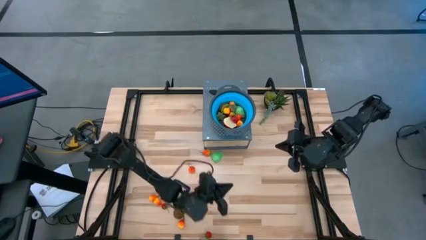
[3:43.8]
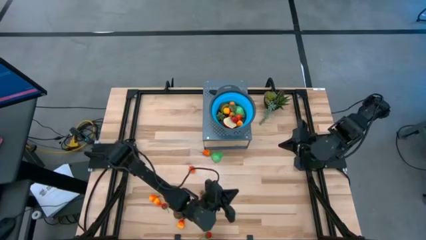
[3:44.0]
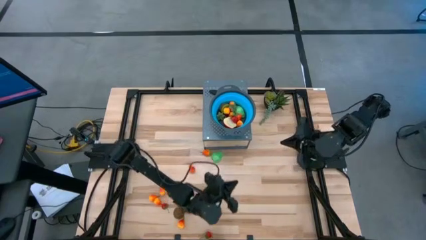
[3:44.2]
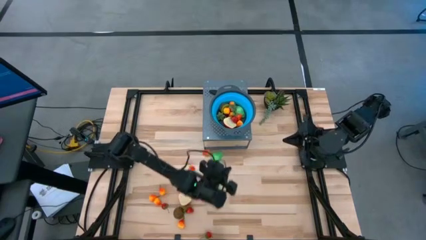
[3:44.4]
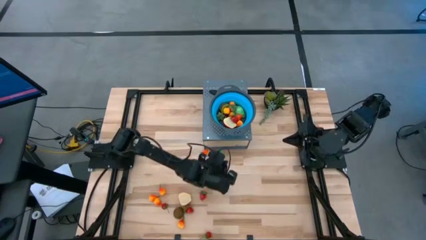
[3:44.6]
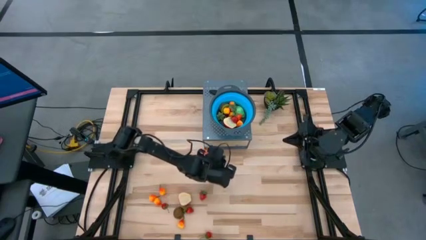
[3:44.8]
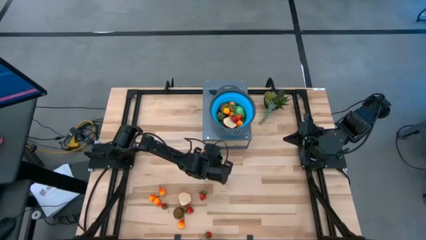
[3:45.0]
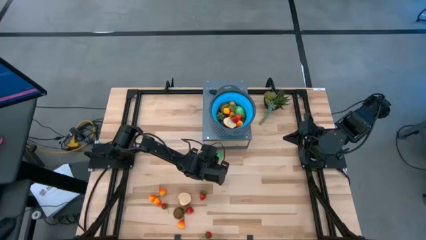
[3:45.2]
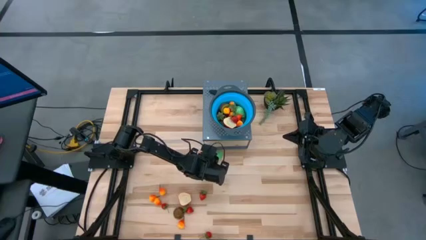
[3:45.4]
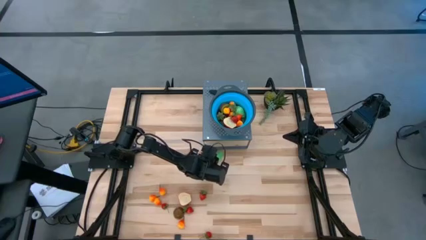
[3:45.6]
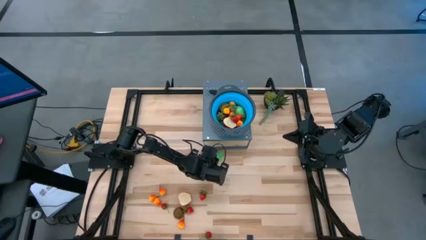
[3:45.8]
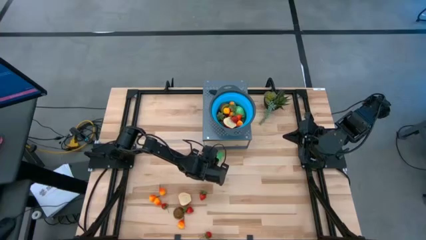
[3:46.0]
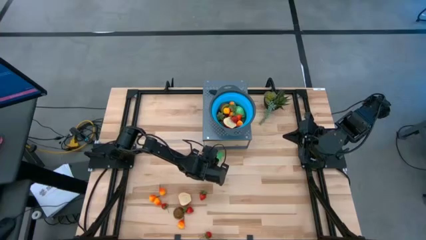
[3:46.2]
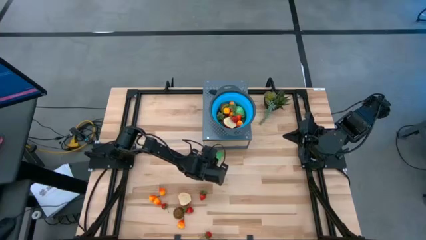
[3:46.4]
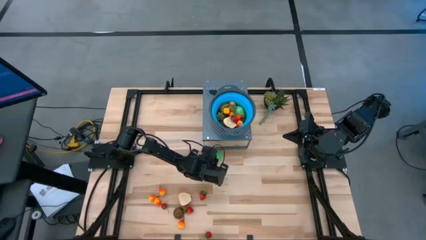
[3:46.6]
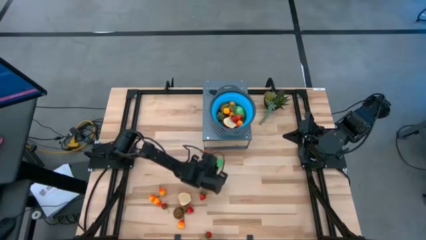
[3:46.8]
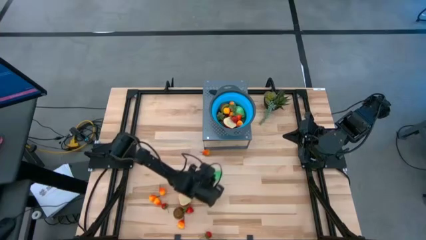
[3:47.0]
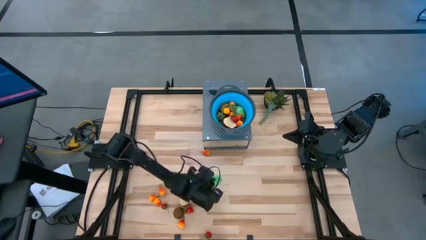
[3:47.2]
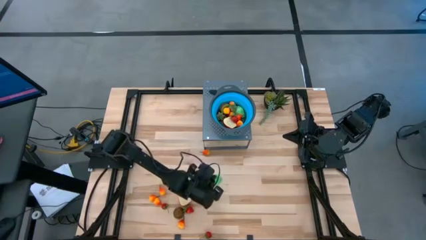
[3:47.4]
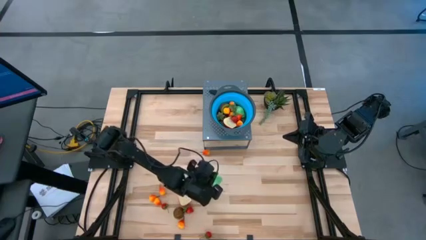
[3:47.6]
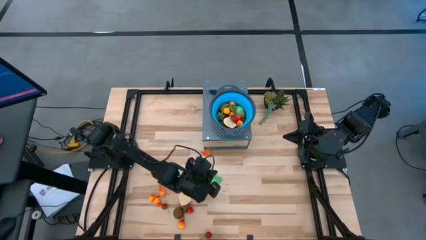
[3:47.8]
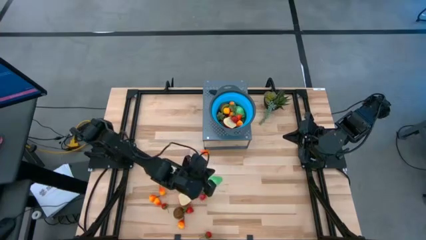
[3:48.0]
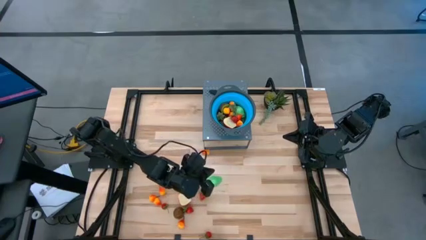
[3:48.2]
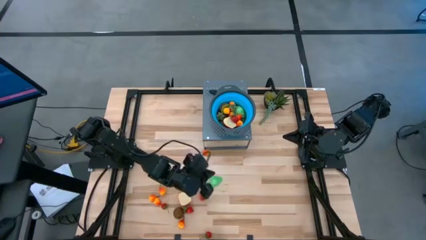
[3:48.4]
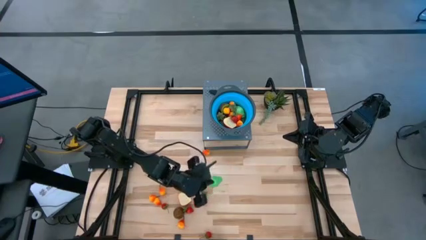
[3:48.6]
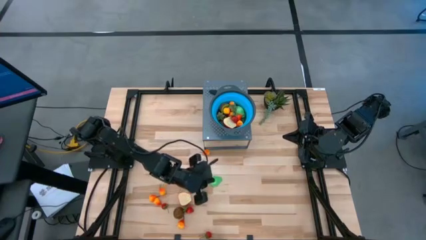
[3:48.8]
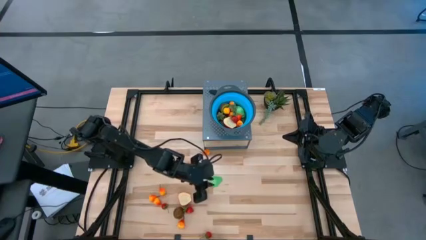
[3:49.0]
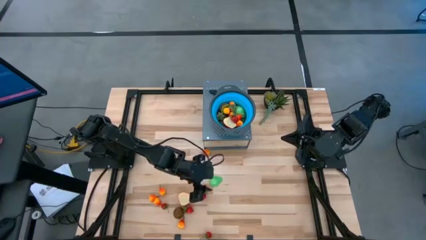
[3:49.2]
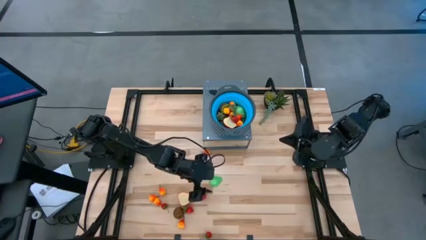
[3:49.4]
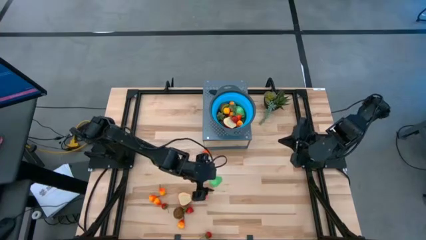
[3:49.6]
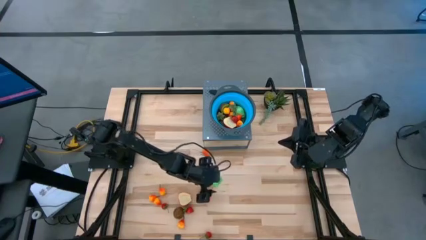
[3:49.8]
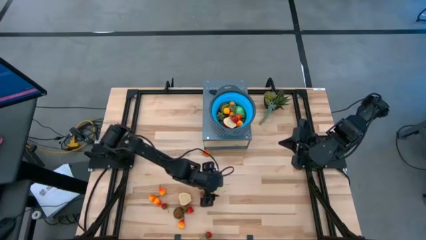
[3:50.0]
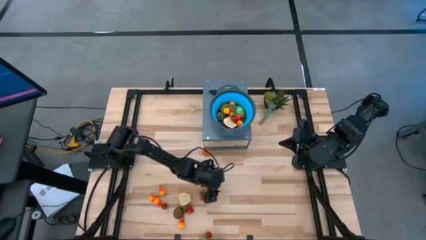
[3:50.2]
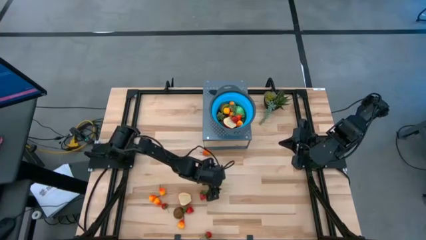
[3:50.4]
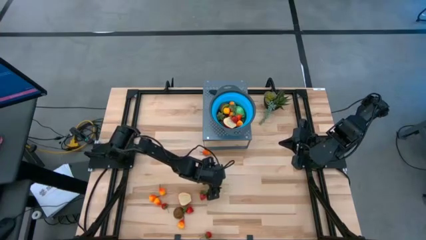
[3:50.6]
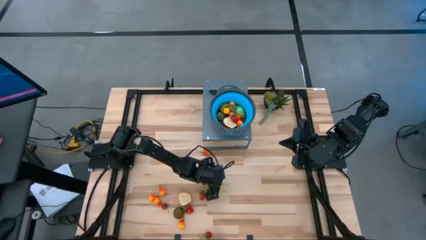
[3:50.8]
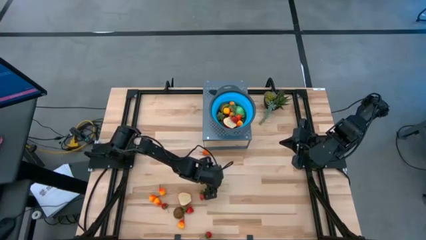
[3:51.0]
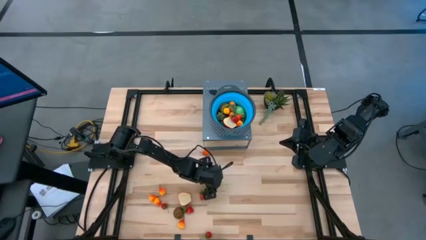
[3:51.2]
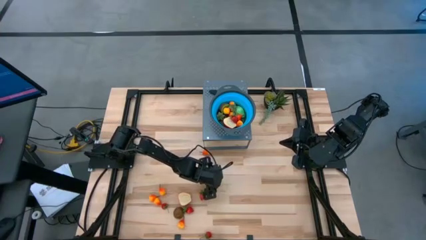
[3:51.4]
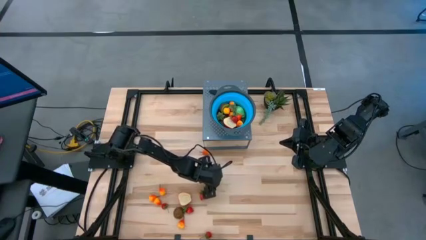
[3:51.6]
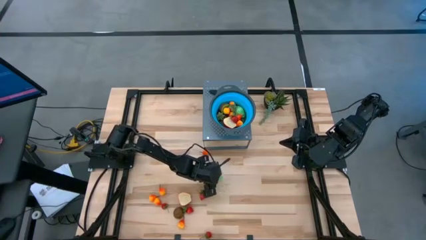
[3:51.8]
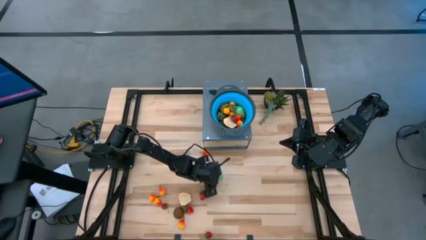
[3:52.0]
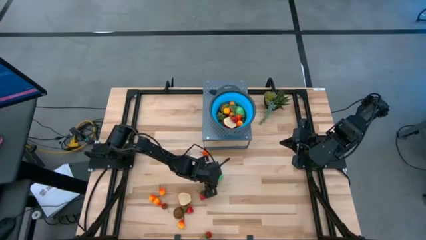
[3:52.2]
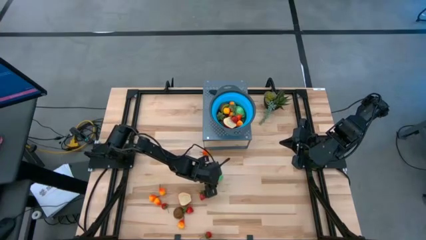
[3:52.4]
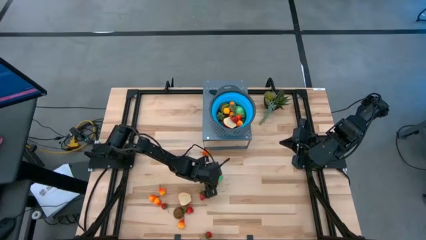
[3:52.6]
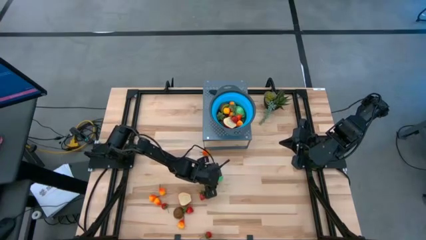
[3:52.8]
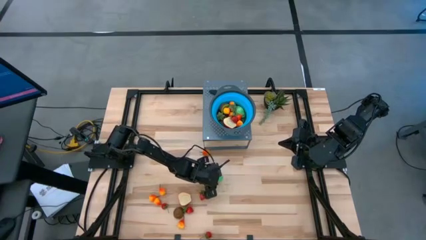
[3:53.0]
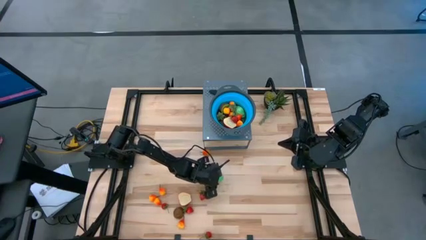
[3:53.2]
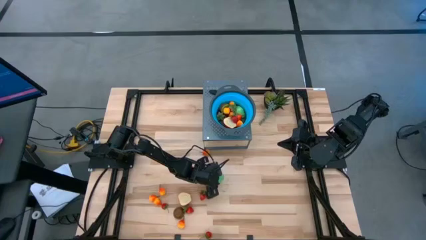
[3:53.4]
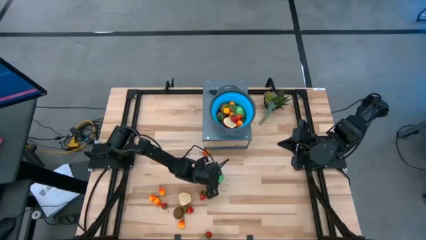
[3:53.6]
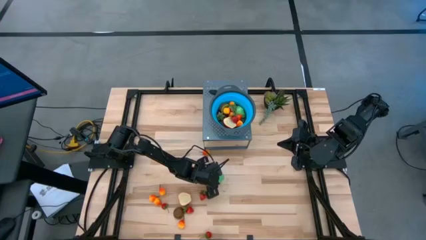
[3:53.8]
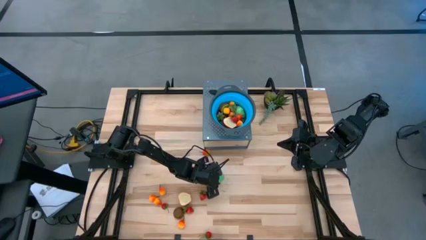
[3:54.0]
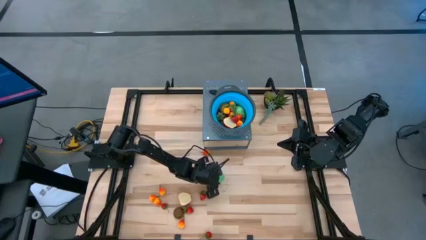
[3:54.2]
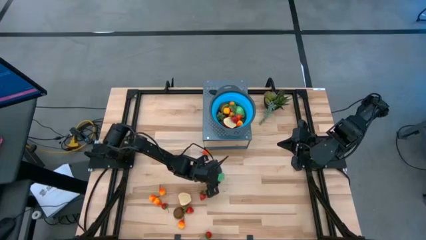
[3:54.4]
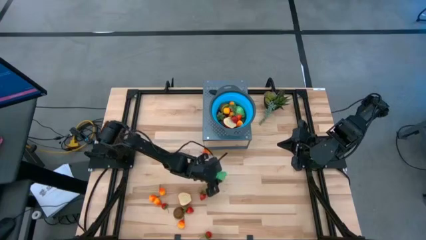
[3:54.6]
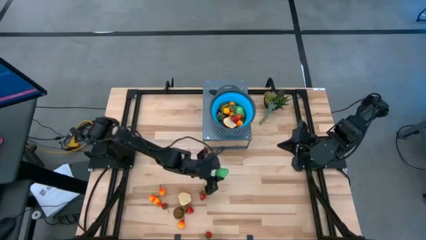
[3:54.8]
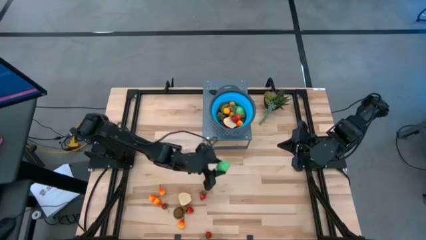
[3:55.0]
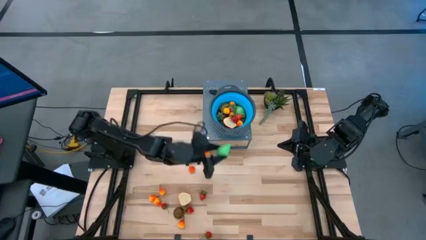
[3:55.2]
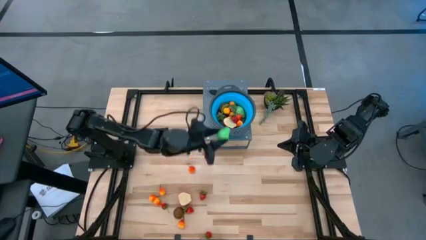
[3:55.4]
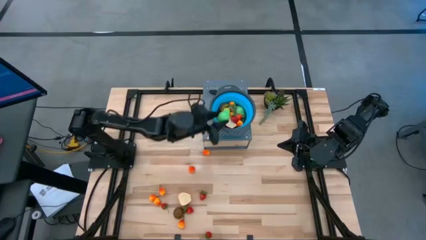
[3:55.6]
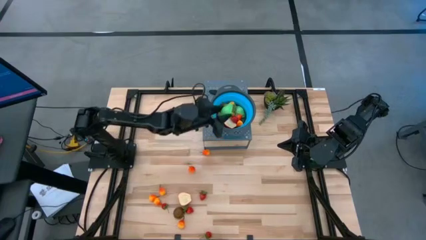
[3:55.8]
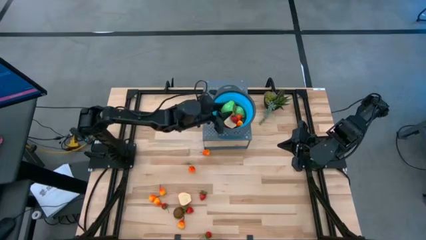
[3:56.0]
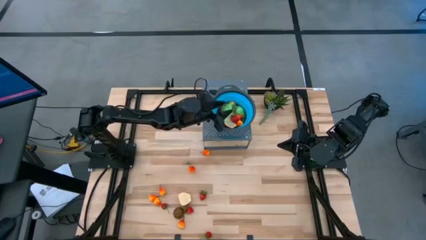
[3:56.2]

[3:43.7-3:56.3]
Task: Pick & Place Fruit
Put the sliced pear into the strainer bowl
